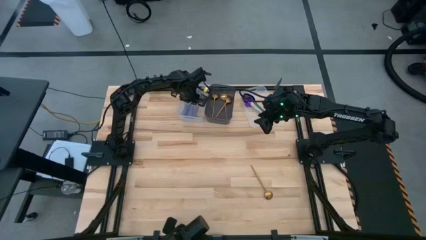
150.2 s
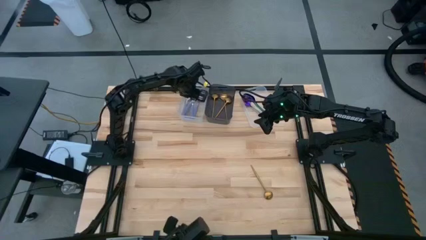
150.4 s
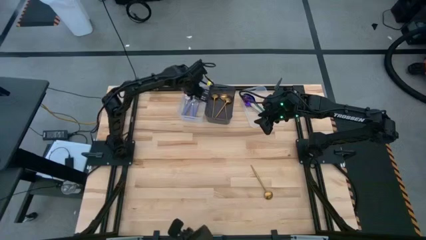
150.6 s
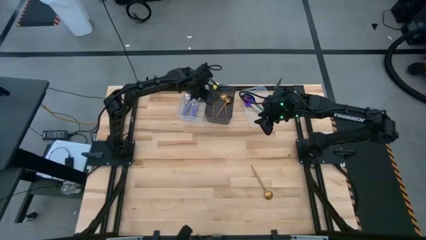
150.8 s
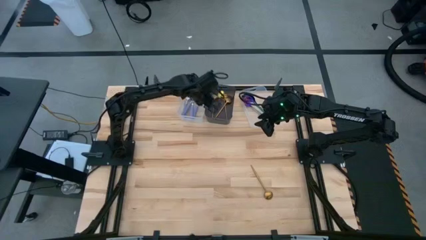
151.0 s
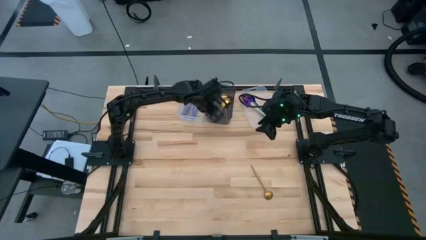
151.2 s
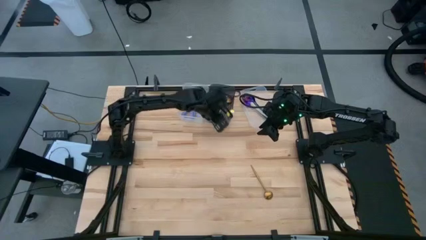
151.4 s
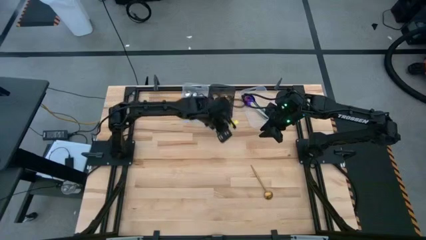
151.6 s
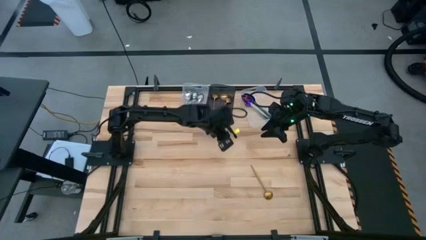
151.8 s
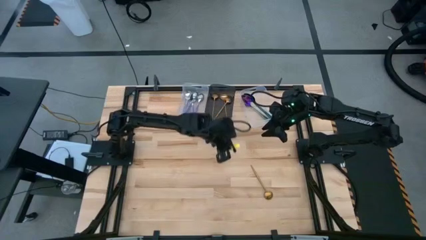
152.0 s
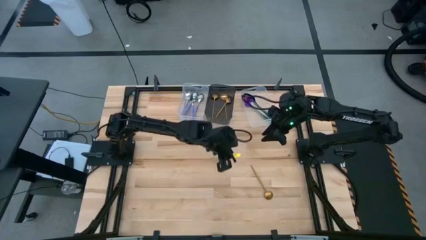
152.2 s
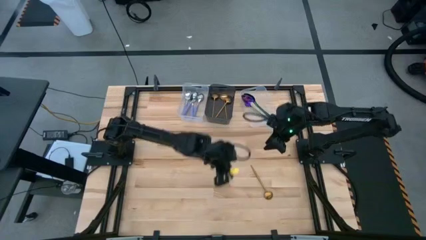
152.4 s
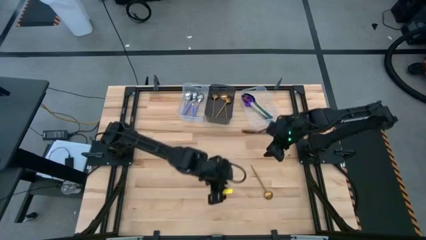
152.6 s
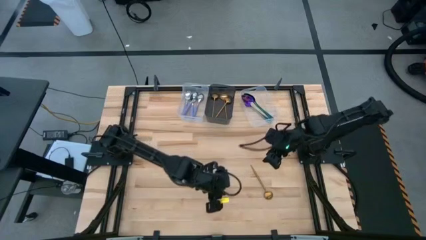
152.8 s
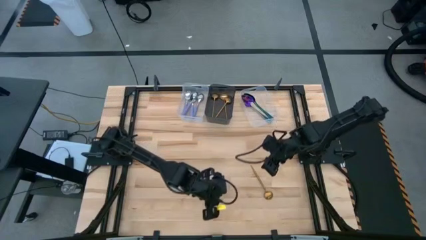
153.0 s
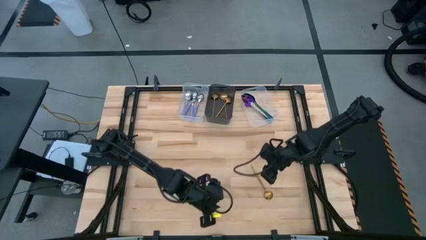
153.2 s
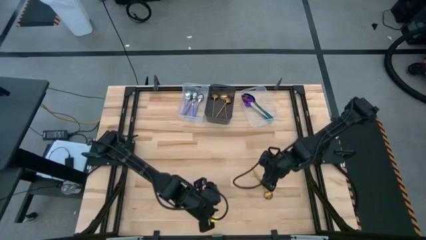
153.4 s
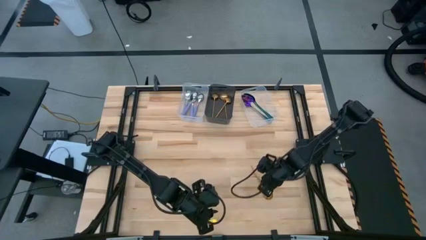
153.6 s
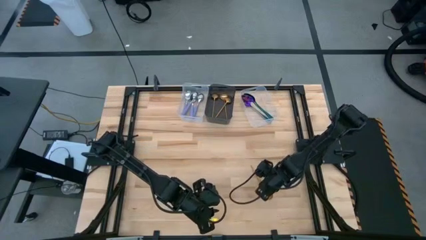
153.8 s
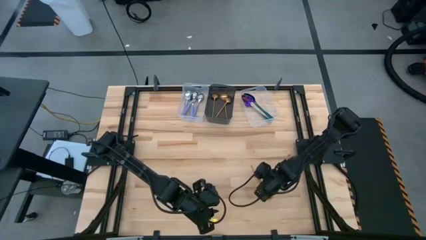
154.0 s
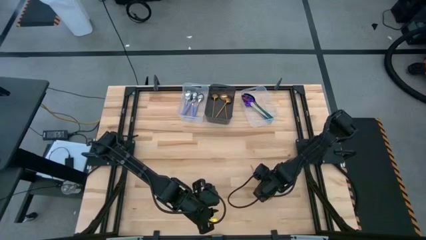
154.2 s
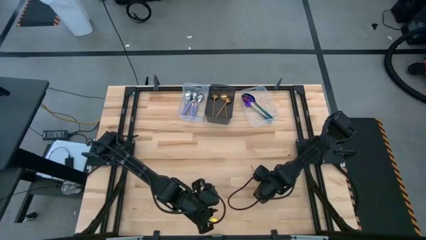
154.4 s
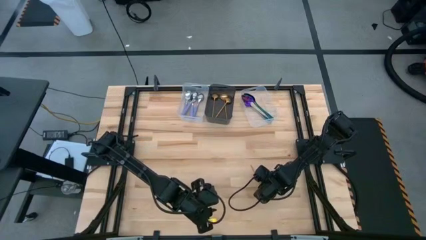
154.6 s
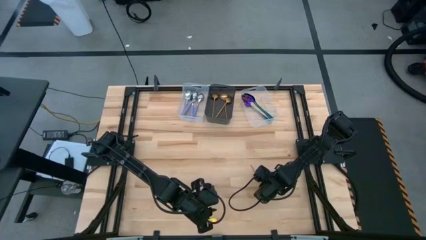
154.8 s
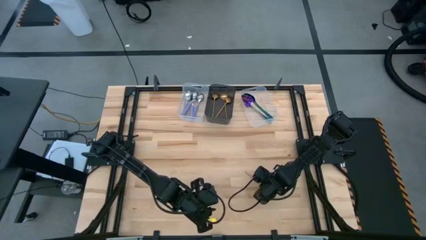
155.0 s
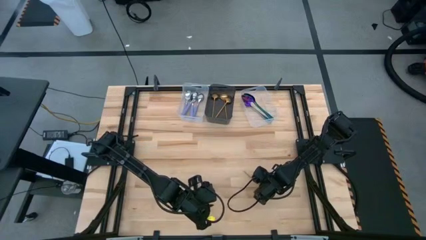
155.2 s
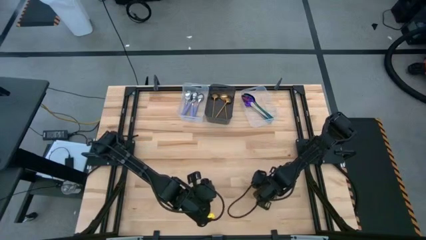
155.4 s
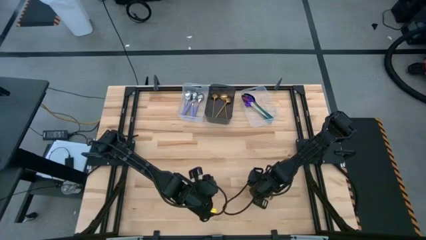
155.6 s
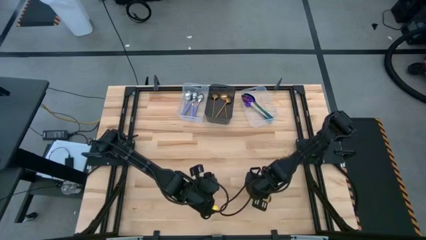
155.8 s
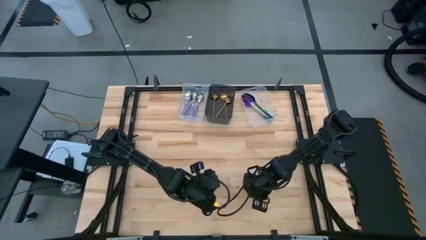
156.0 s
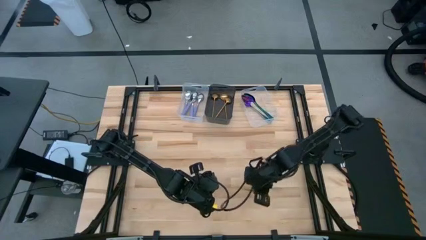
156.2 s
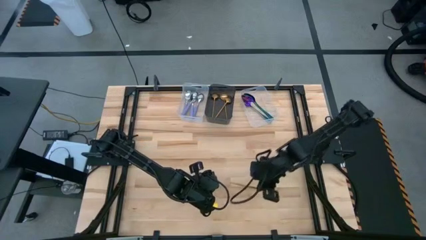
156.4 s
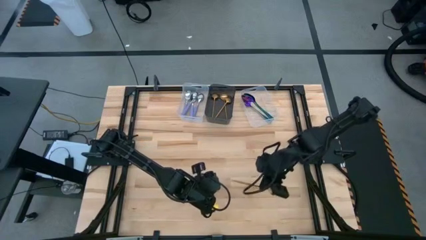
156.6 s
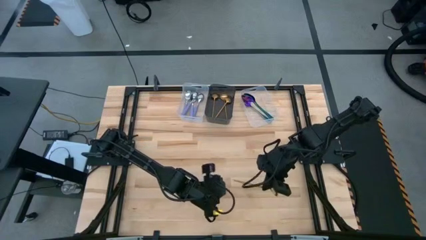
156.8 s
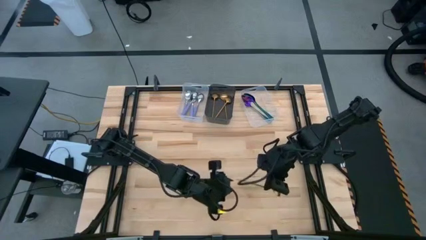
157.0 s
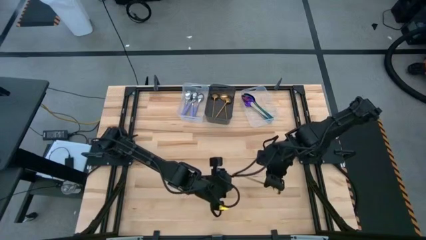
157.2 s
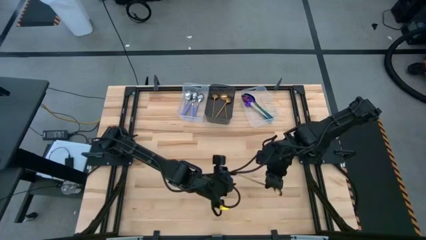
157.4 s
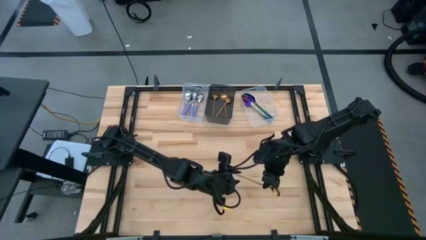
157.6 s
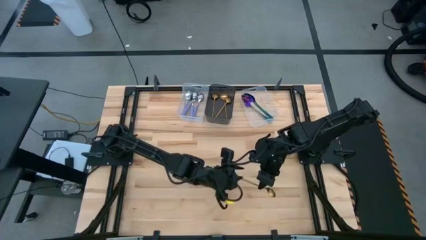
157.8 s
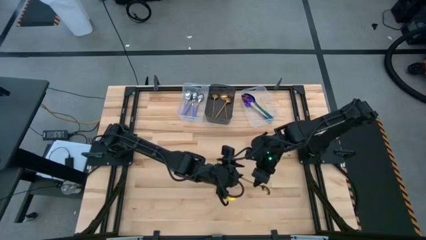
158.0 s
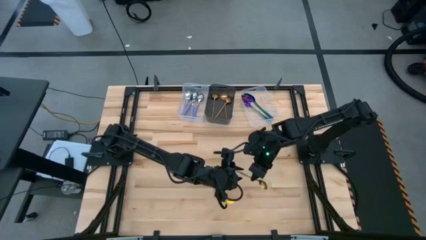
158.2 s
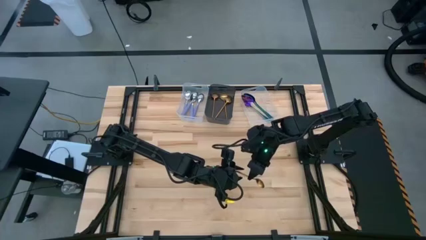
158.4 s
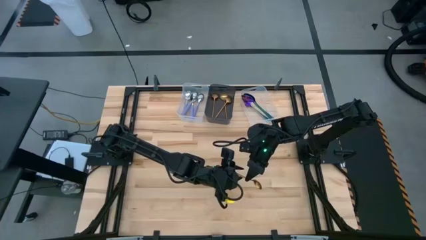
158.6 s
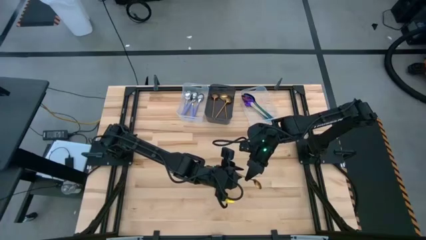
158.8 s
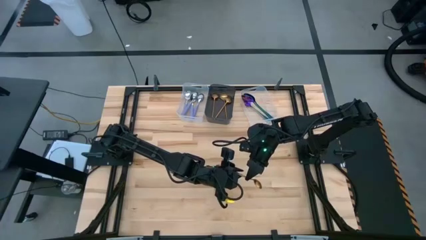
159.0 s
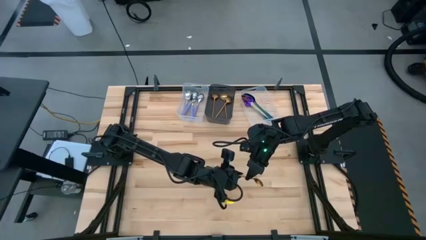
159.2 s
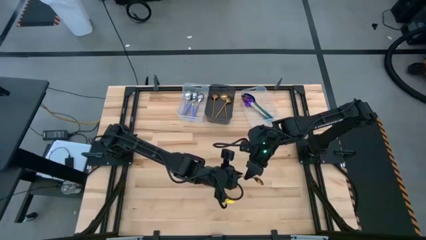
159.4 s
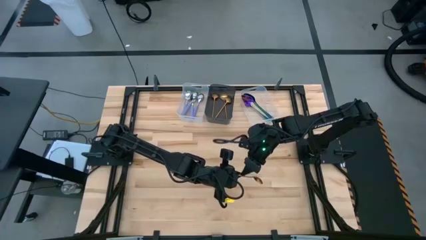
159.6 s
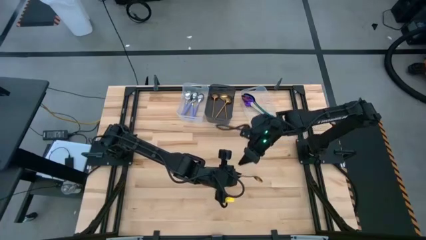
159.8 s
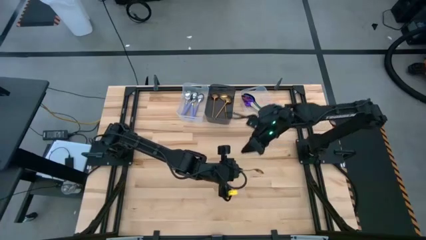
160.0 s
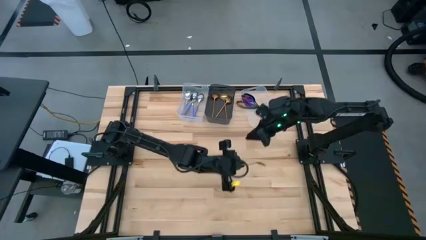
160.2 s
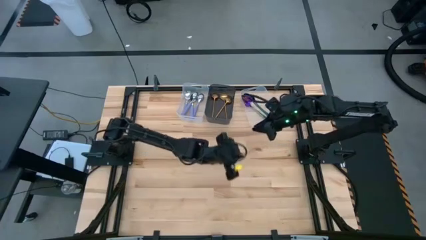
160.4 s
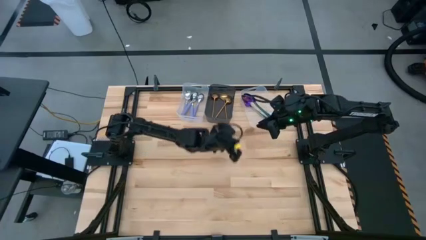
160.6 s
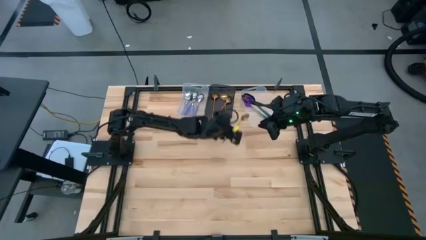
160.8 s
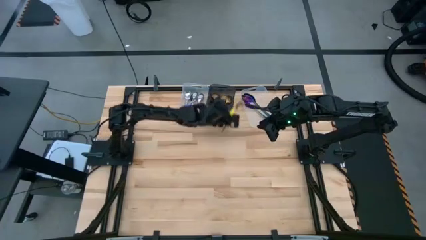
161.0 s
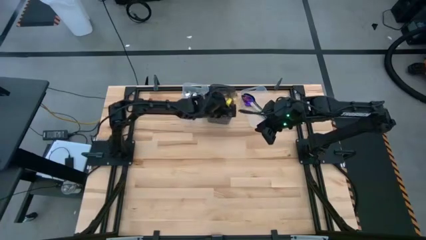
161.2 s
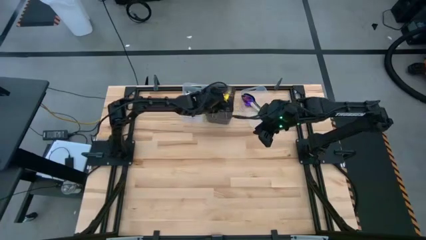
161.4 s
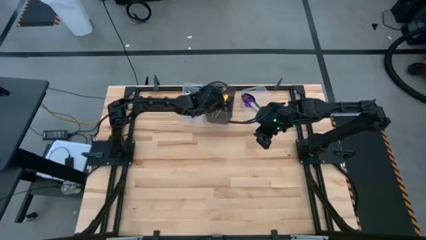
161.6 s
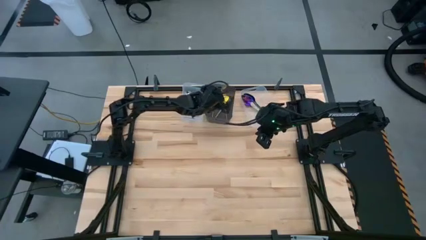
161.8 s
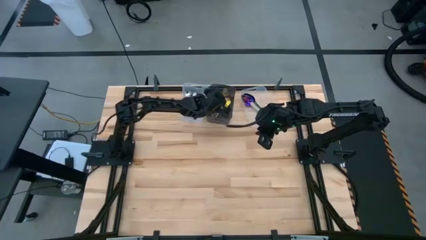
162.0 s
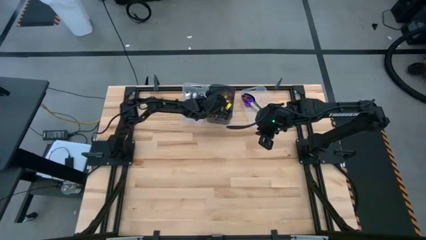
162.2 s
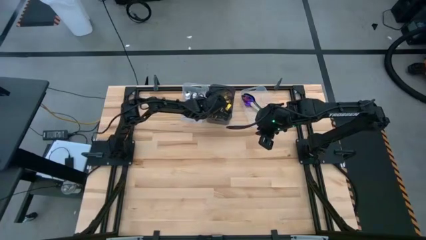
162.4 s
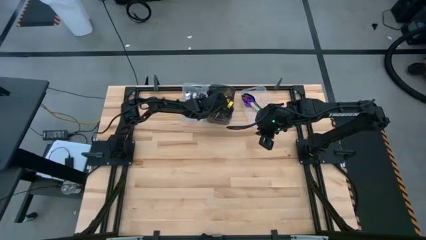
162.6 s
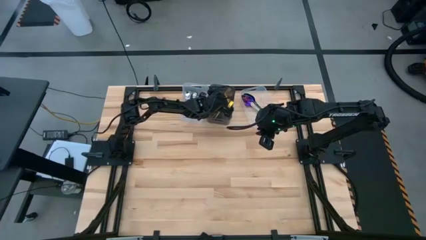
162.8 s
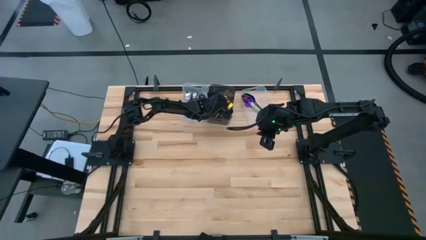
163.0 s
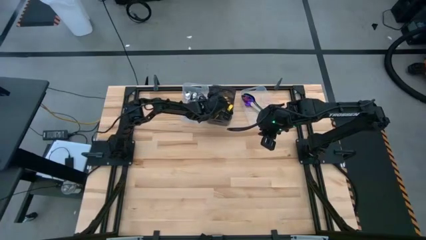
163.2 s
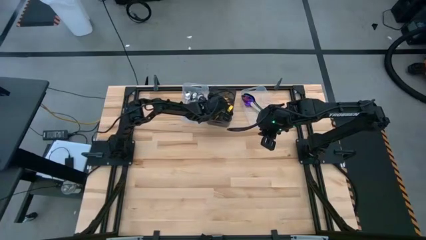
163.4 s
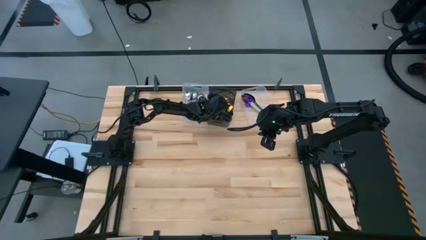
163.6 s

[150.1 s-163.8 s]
Task: Sort silverware by color (type)
Put the gold spoon into the black transparent bin
